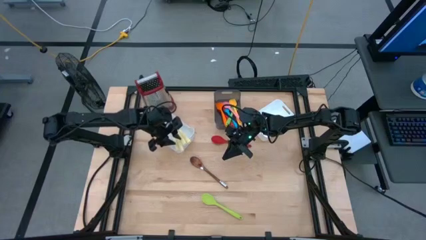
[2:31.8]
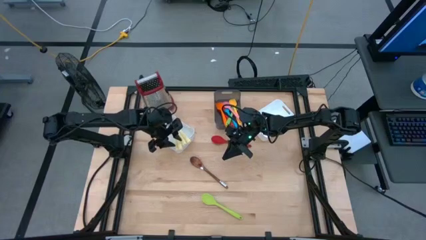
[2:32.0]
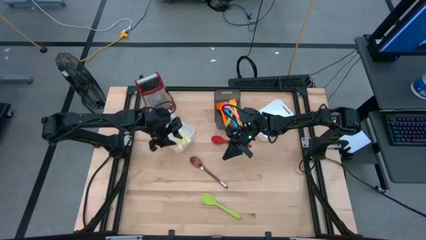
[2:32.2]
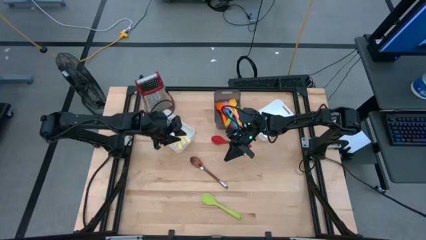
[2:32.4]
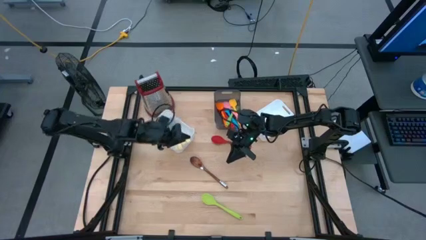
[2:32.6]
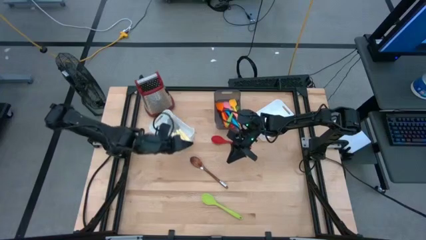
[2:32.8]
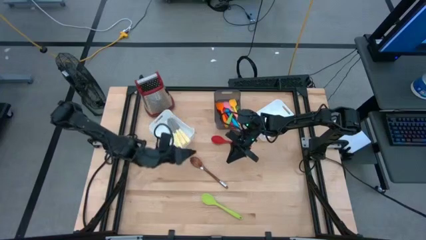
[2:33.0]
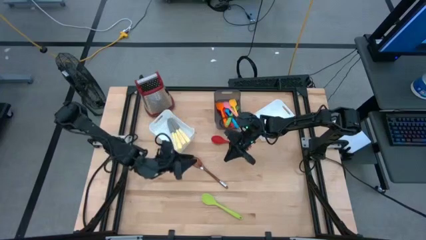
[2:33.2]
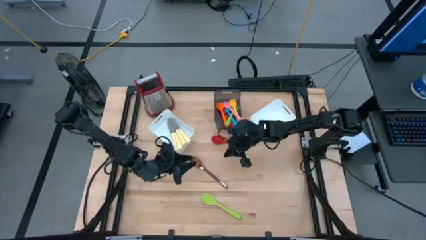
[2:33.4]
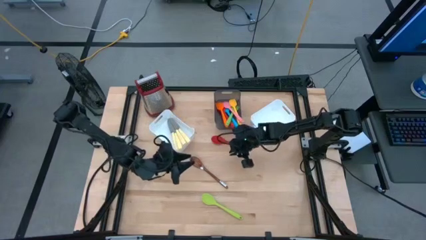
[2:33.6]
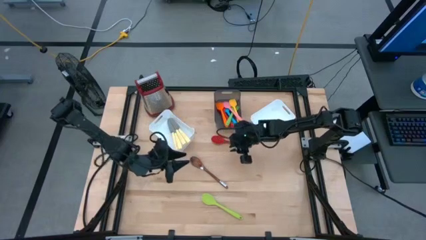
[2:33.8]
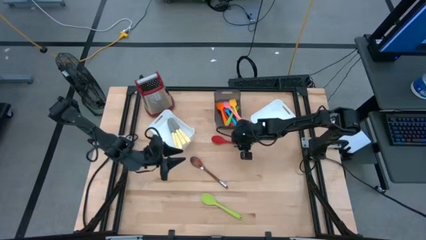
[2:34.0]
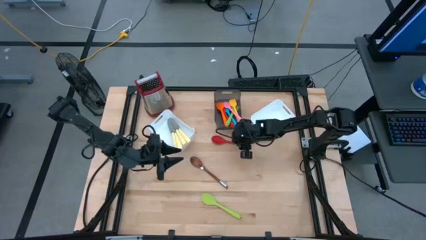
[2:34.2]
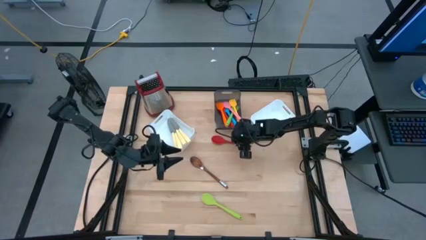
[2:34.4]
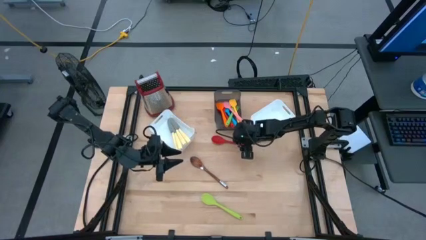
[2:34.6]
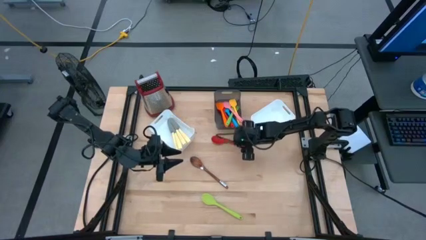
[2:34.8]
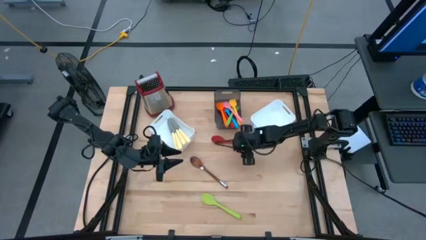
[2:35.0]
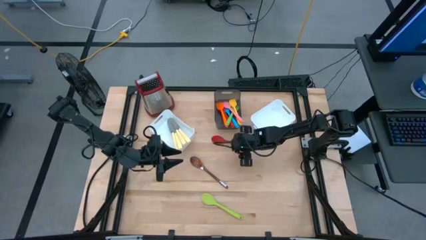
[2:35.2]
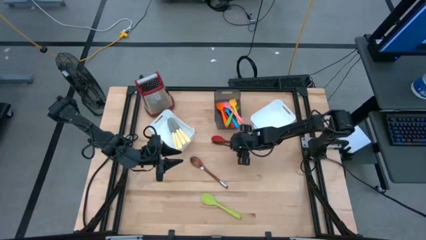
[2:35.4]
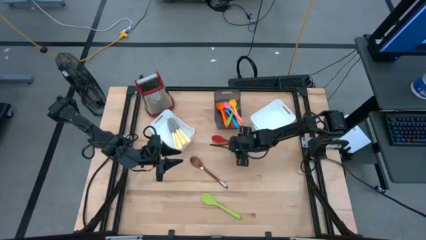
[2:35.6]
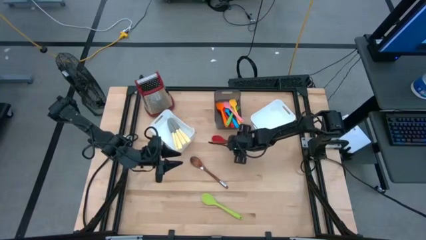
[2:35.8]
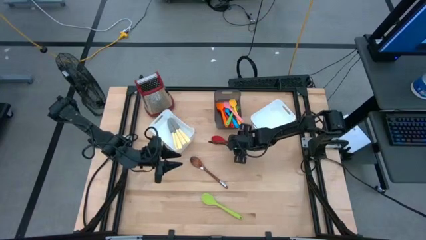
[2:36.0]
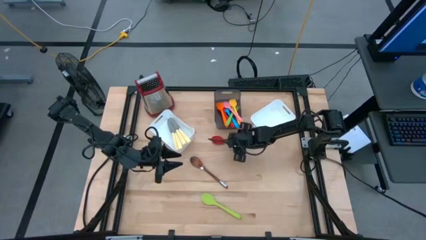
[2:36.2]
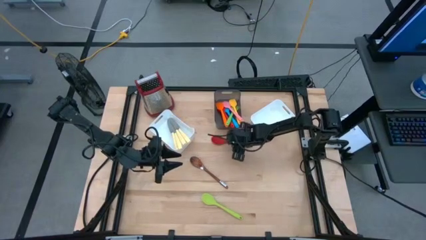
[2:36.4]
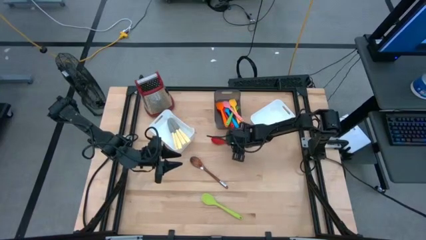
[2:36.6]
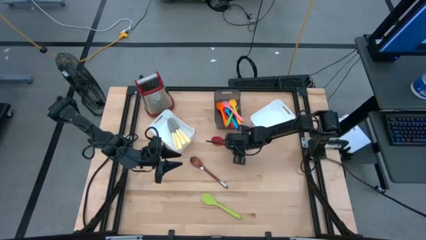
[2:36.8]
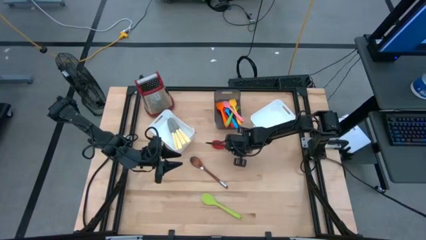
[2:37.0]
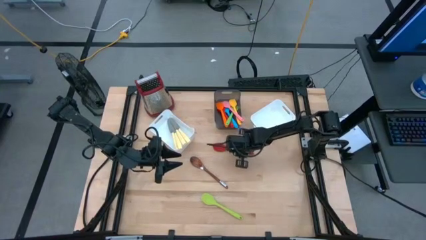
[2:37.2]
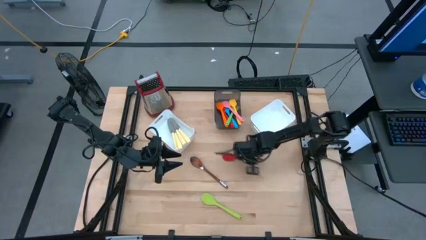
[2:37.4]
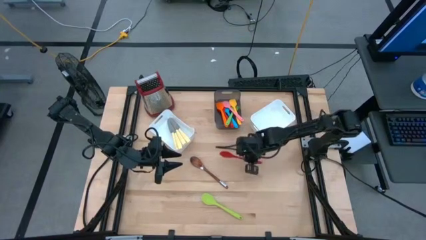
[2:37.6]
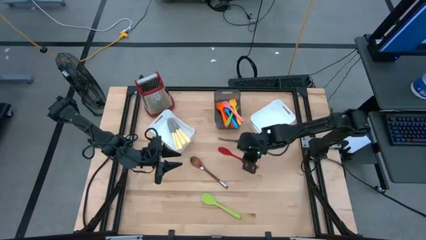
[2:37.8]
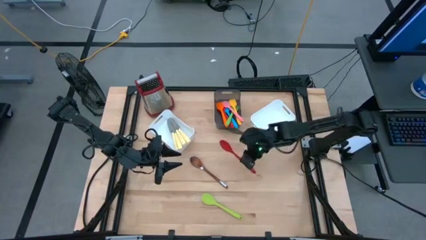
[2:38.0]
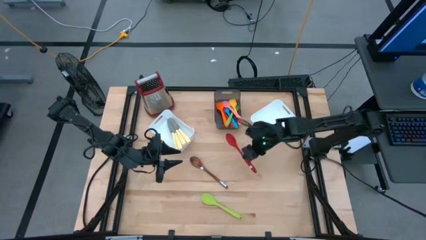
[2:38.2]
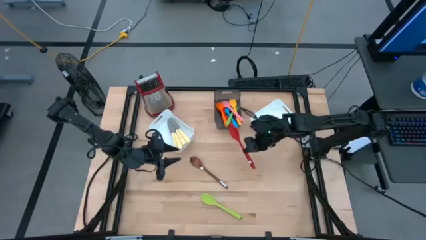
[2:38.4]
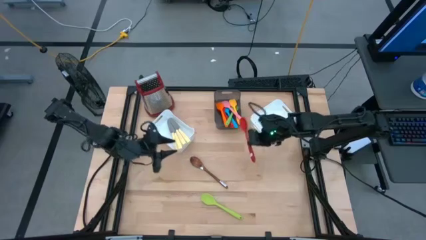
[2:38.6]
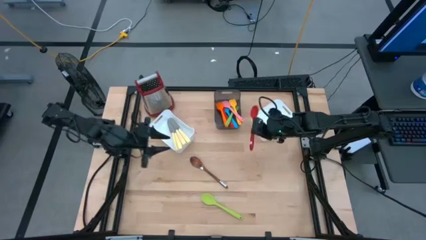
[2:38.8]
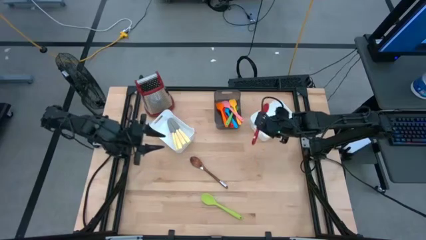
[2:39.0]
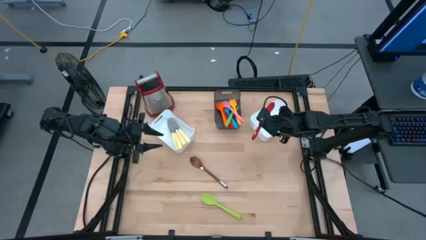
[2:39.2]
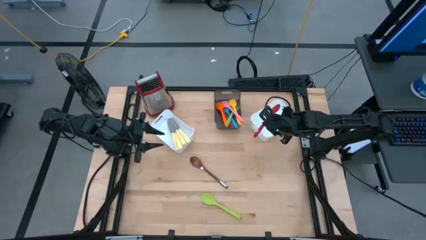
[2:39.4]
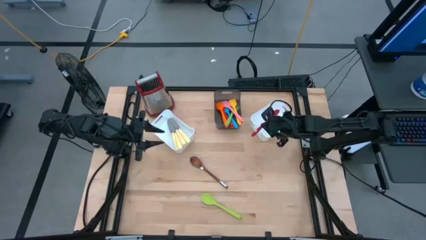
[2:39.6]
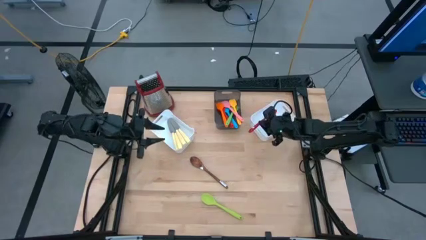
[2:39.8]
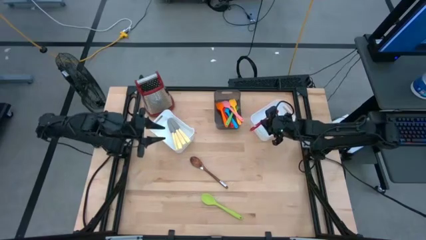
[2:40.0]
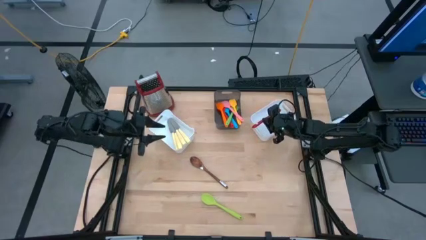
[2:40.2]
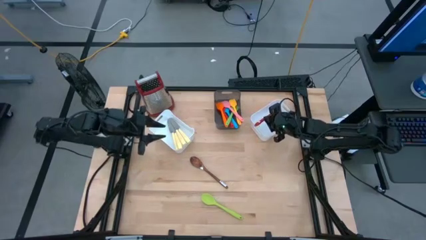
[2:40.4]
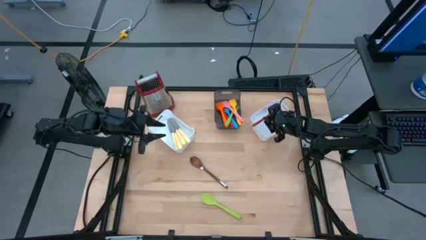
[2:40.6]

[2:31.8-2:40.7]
Task: Pick & Place Kitchen Items
Put the red serving spoon into the right white bin
